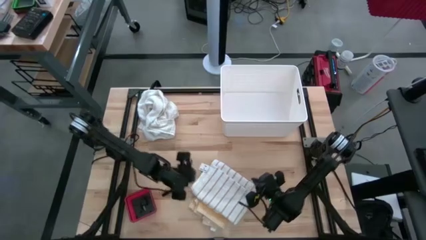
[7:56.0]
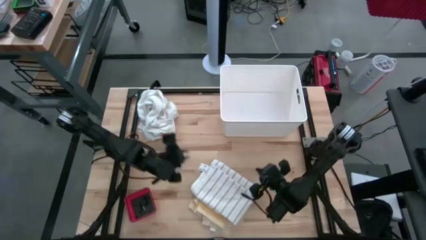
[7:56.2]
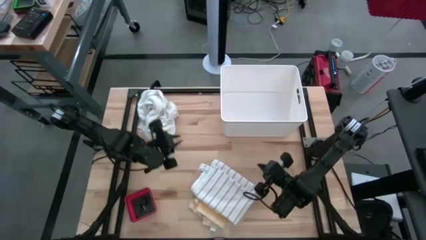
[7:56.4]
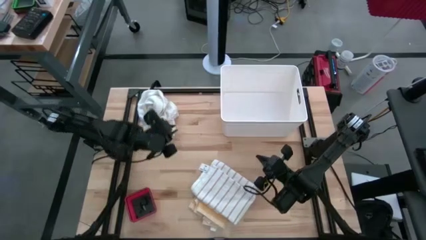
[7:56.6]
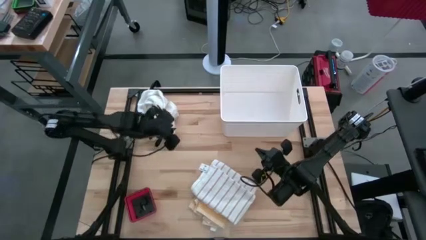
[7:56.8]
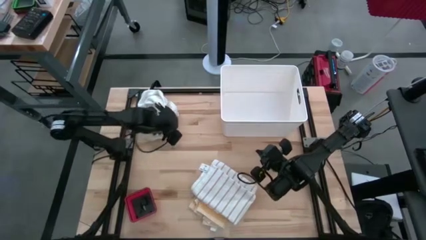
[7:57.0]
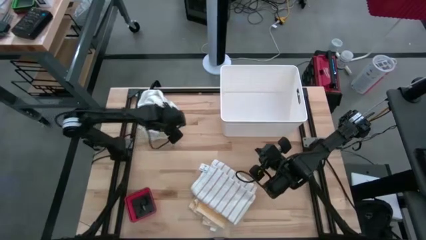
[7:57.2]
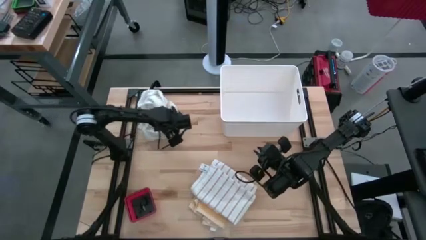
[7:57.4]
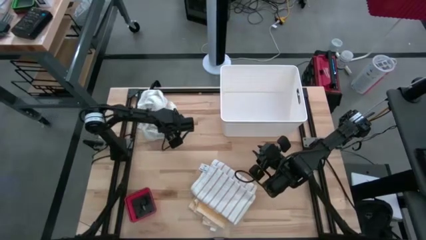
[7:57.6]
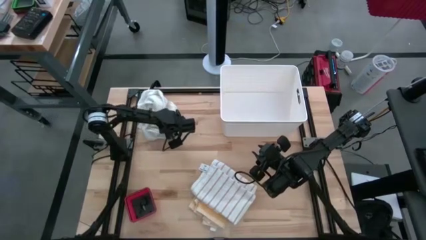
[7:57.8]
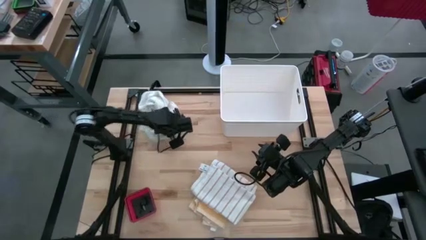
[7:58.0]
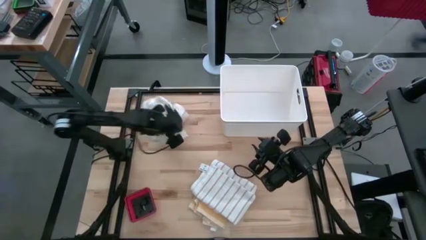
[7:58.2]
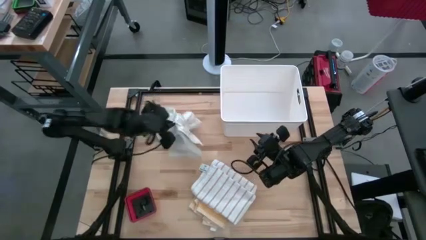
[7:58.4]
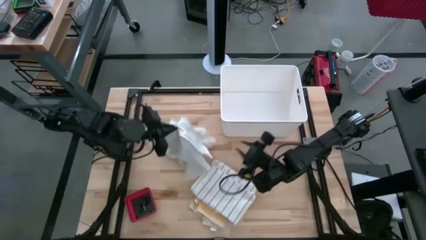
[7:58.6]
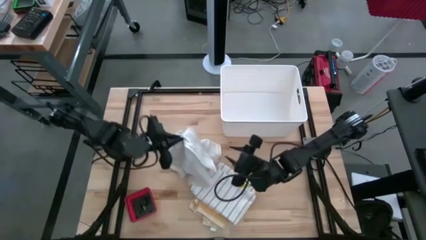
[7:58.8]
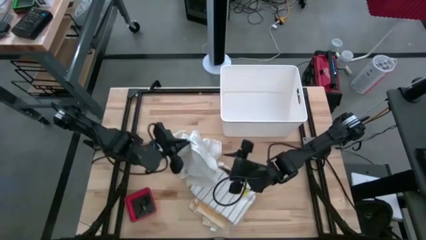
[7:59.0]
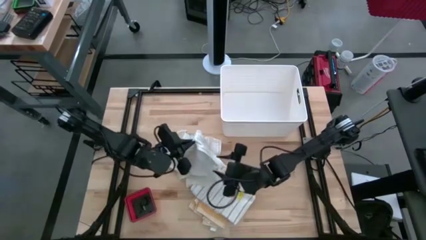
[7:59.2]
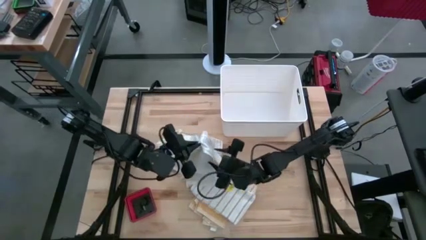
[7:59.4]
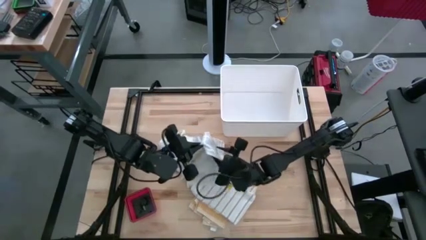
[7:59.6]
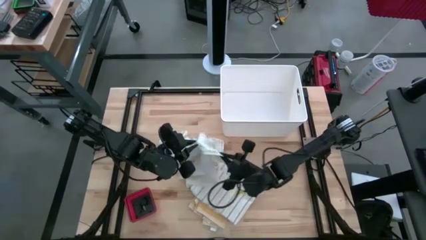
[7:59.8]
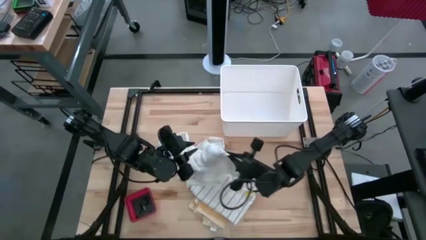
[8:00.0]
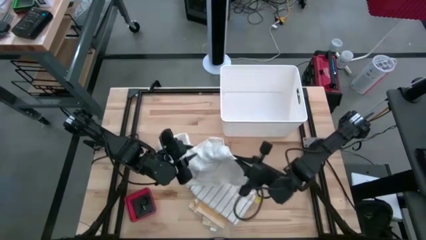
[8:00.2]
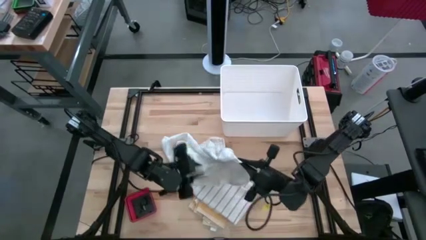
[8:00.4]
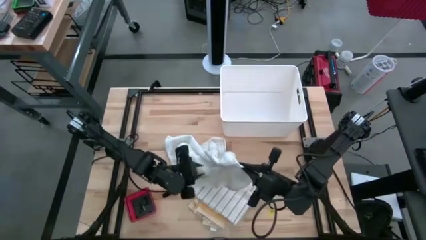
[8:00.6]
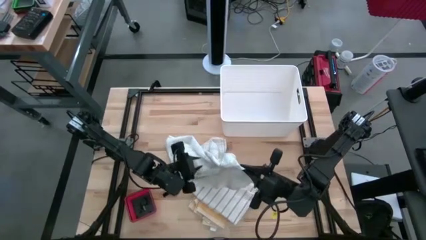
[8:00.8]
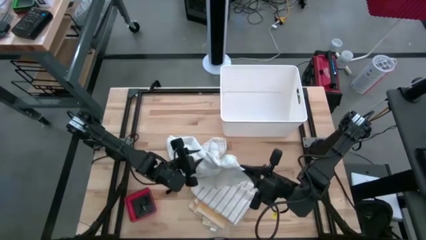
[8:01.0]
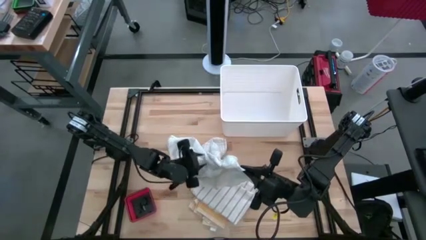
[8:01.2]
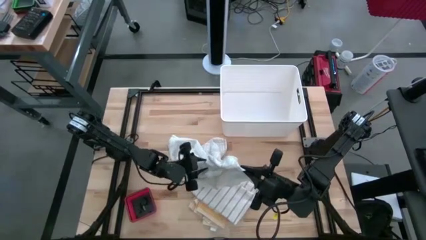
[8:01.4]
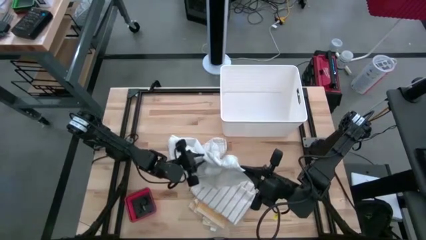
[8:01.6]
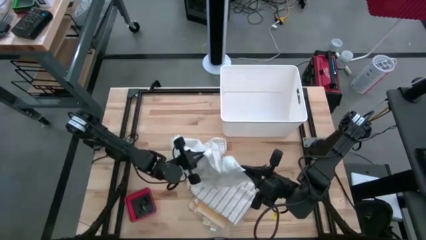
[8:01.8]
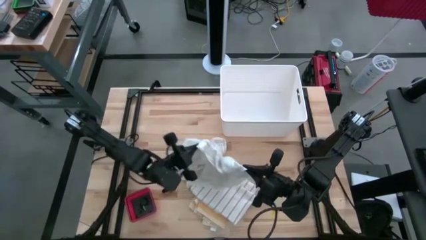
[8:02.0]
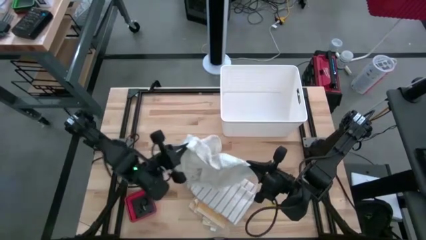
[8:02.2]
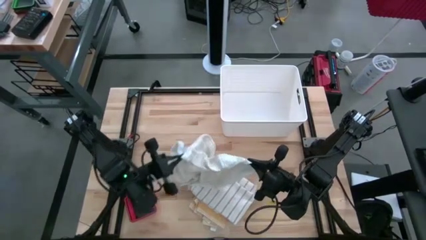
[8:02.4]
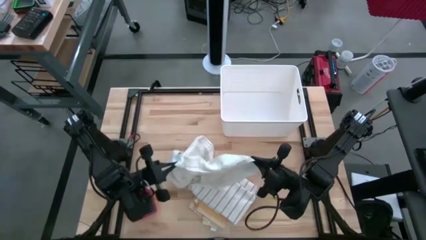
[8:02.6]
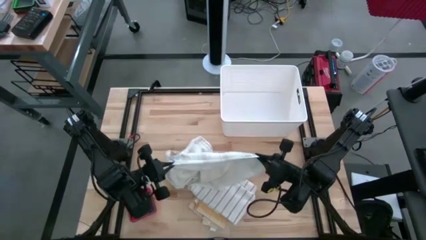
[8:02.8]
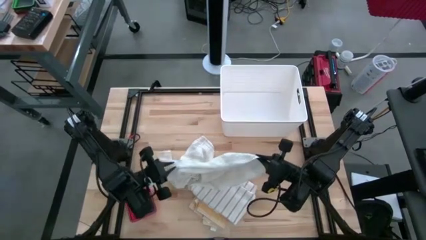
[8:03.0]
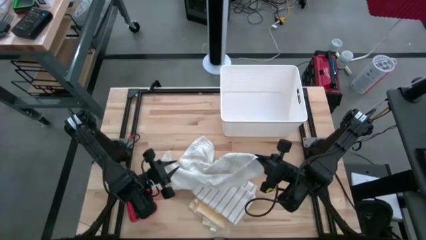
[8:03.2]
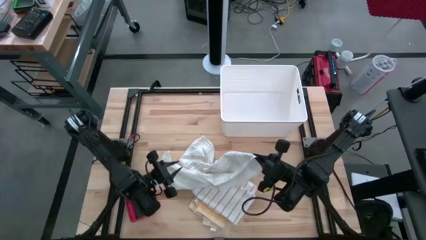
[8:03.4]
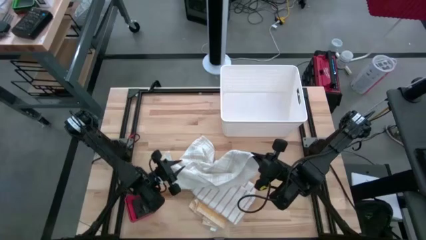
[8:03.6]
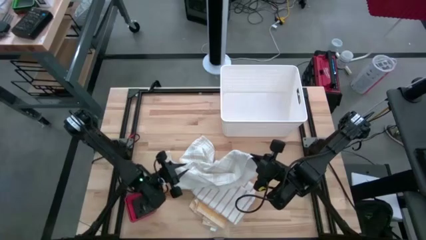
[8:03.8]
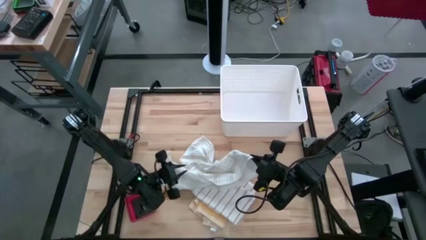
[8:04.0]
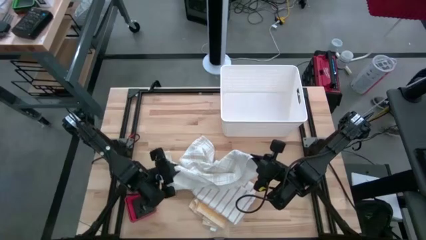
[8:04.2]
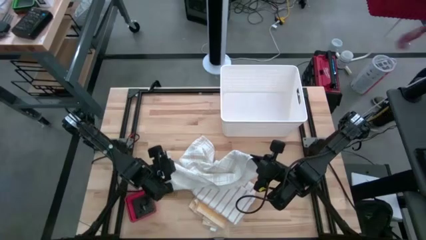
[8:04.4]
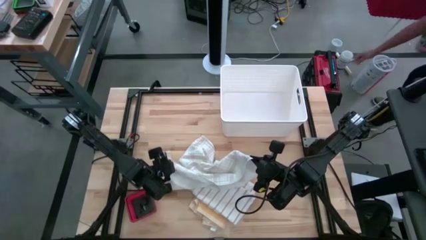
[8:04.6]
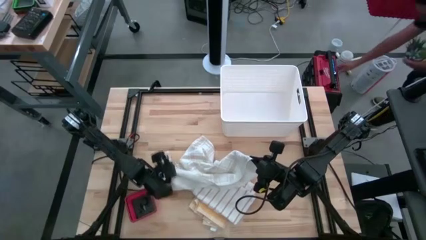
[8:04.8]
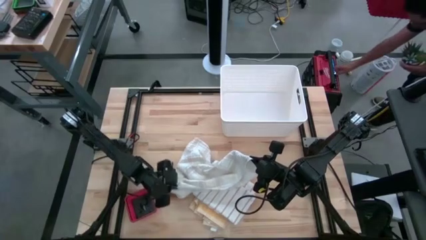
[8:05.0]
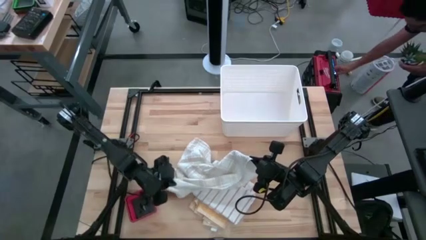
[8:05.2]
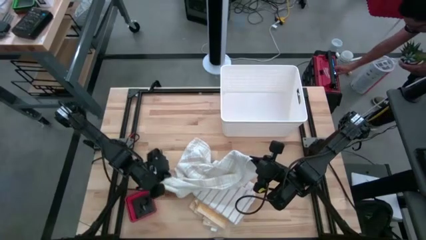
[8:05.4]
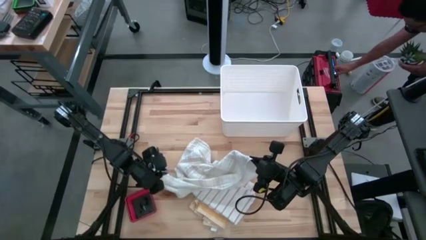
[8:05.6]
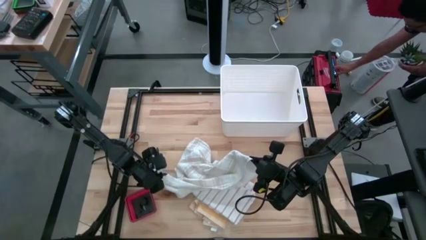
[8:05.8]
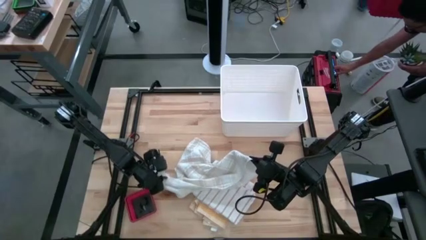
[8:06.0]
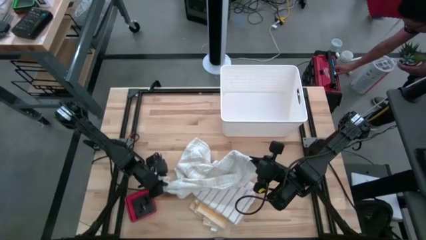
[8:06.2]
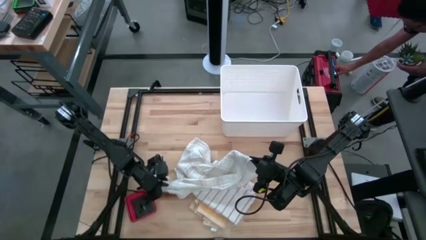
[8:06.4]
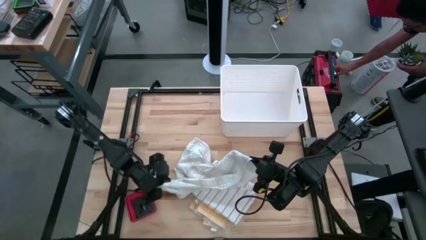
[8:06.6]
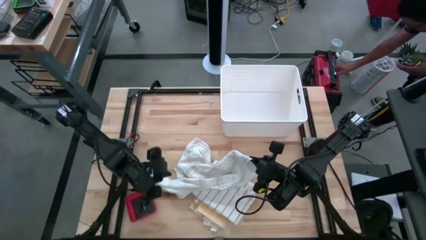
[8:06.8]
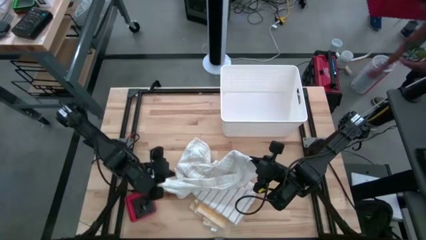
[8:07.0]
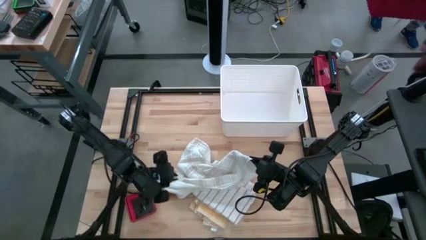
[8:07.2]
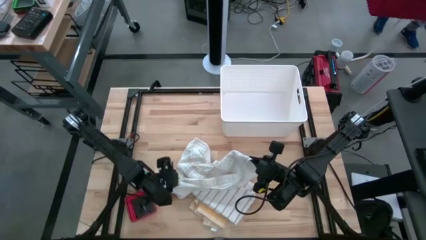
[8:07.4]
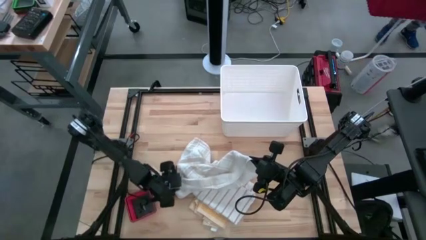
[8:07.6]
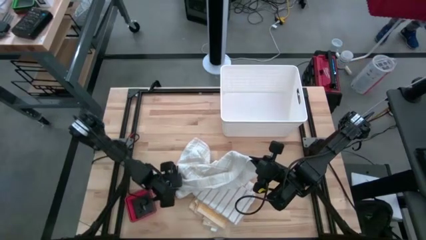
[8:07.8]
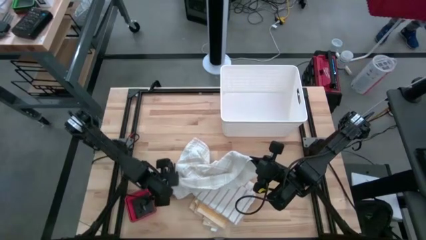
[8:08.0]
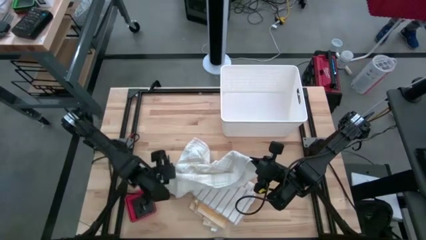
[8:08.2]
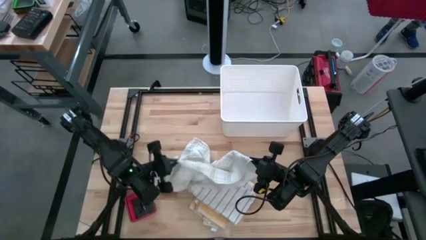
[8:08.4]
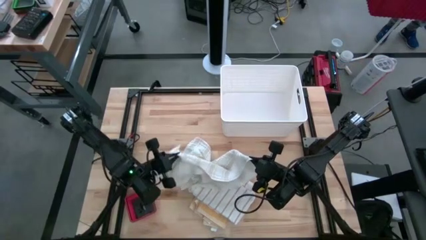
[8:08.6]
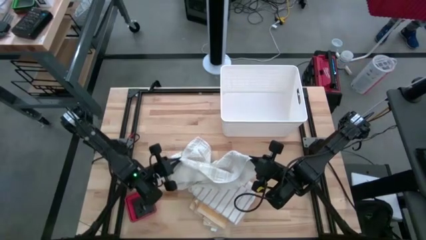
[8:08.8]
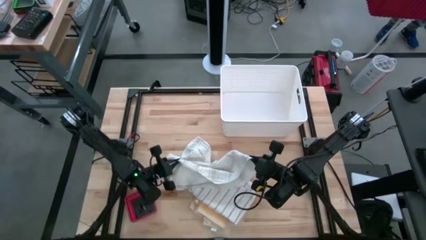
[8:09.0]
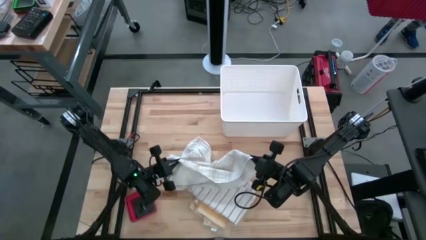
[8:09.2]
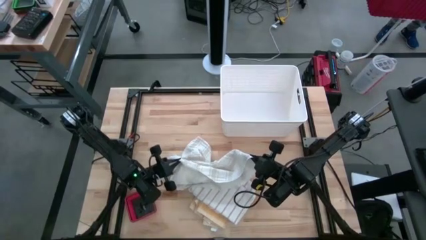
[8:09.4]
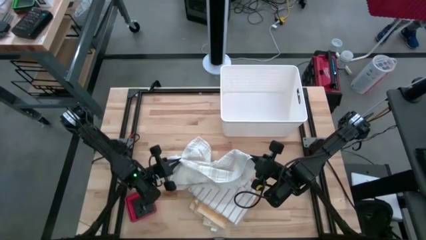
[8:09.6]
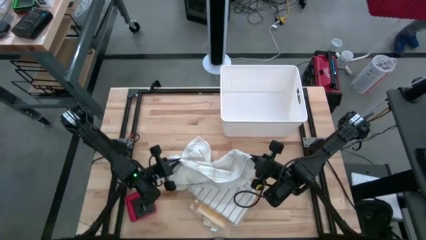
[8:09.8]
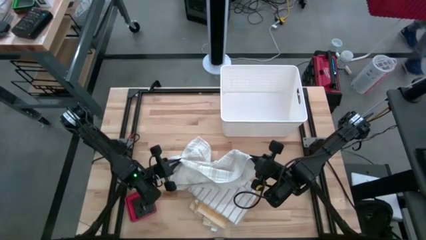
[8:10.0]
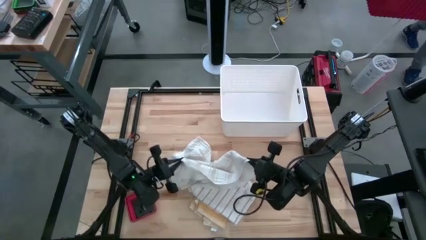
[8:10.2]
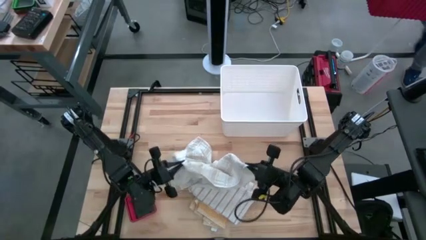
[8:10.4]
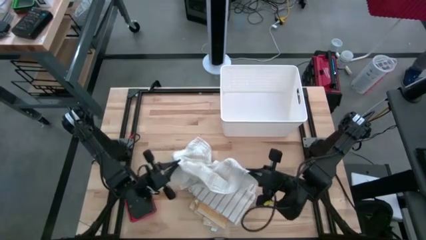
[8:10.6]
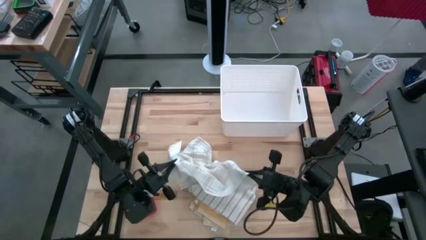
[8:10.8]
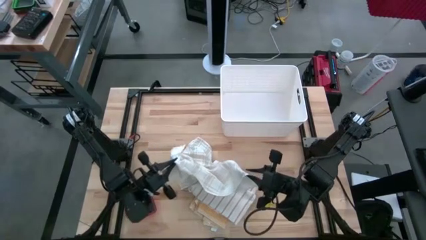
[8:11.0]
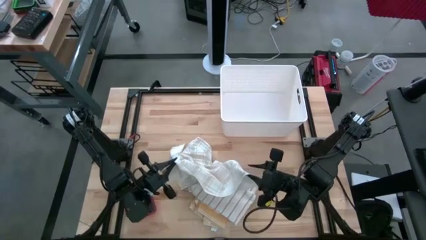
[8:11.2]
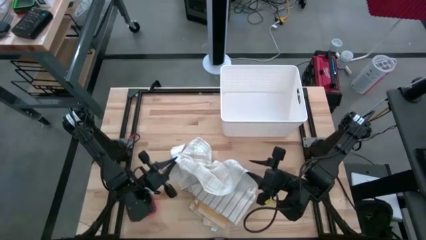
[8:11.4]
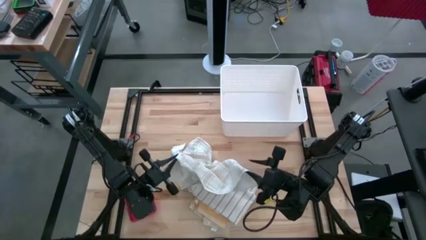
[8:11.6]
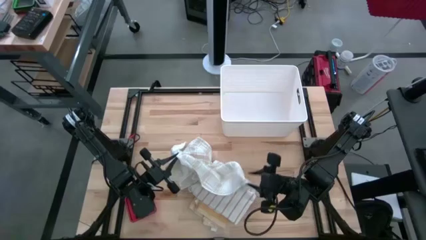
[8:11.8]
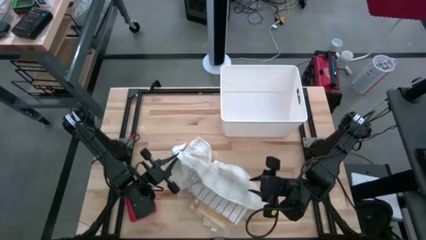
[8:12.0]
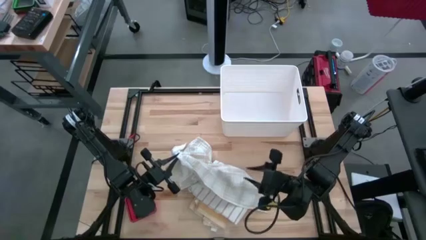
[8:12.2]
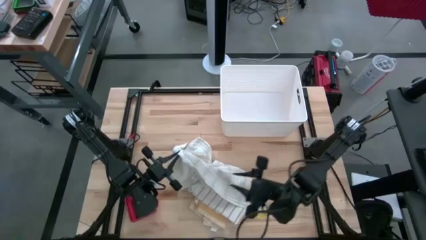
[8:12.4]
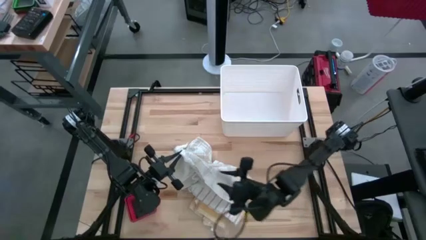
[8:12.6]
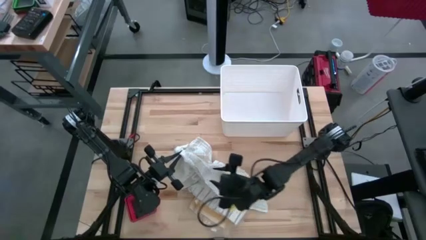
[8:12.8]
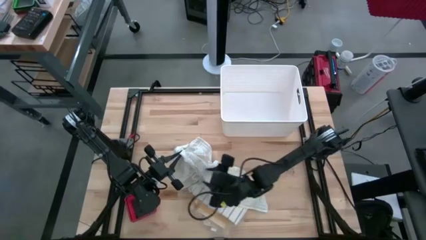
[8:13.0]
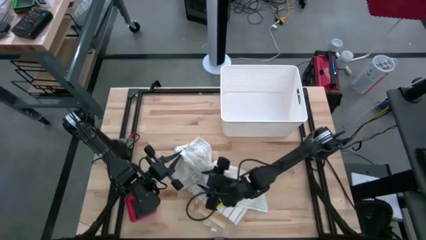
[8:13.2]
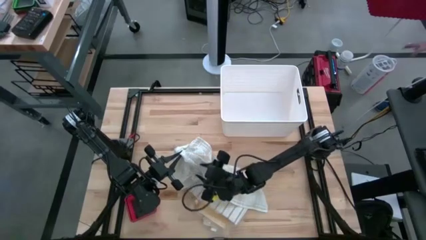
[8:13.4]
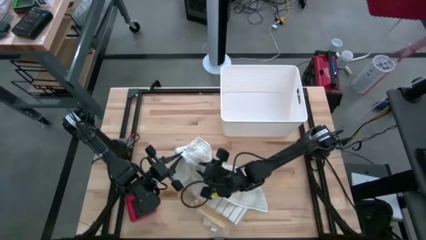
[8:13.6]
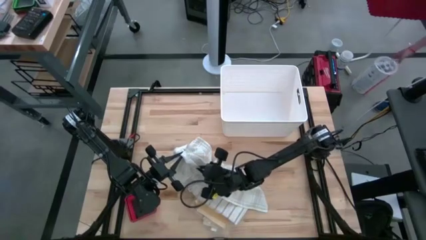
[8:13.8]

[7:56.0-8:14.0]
Task: Fold towel
Fold the light brown kitchen towel
